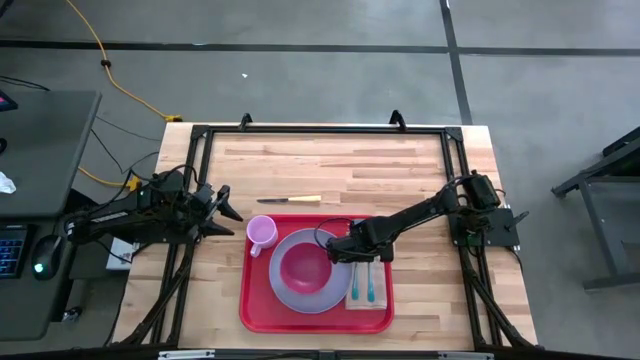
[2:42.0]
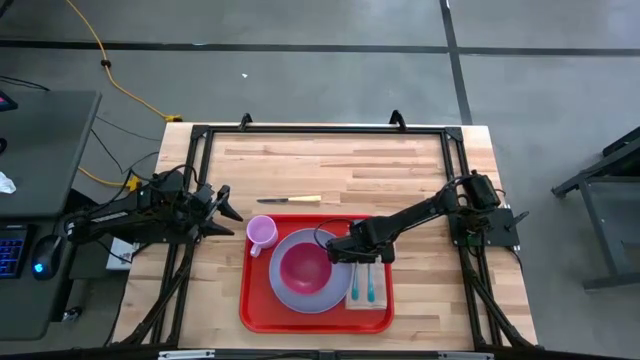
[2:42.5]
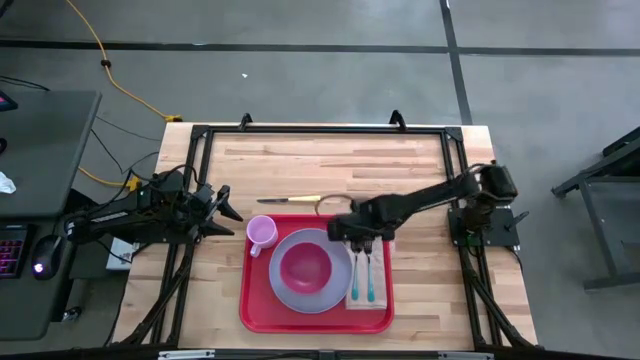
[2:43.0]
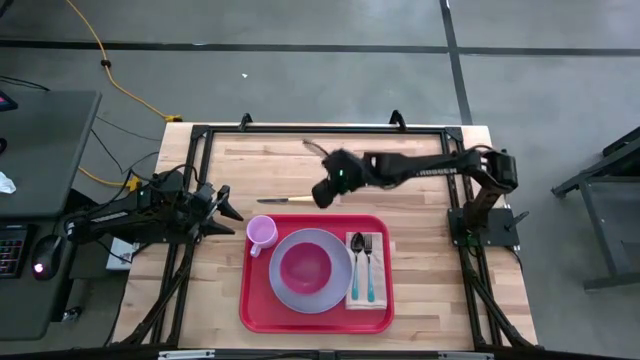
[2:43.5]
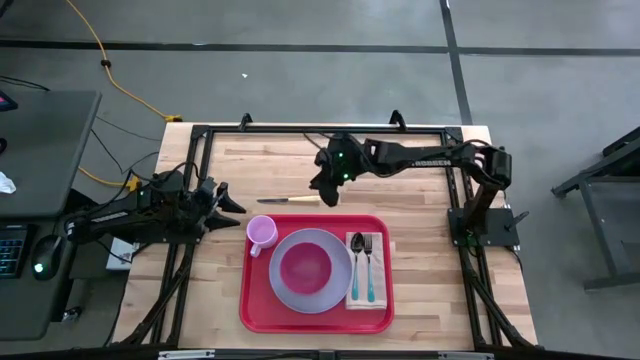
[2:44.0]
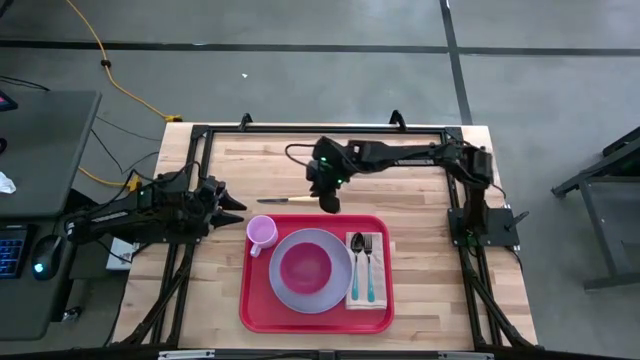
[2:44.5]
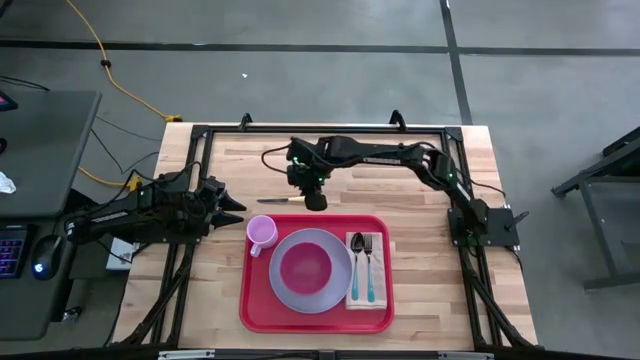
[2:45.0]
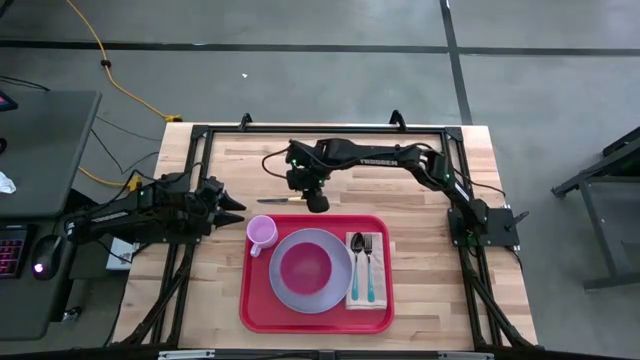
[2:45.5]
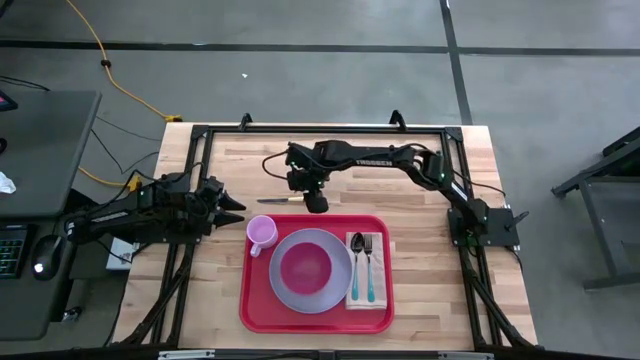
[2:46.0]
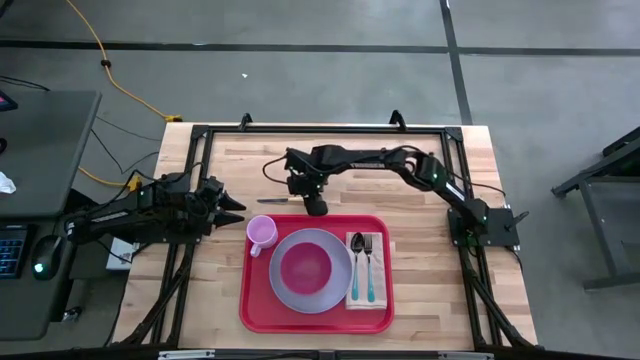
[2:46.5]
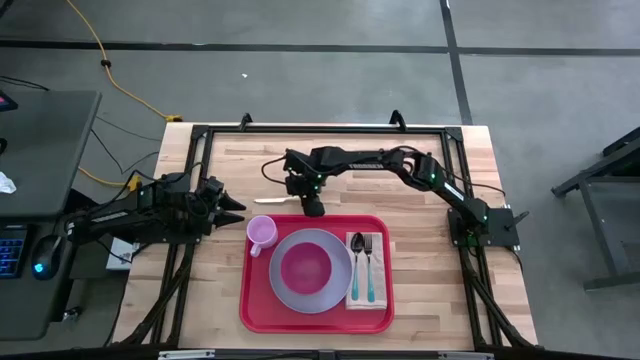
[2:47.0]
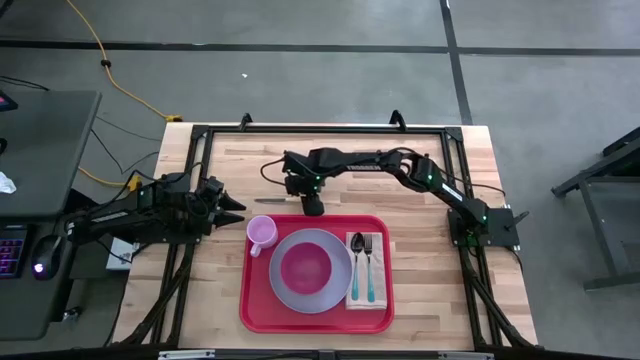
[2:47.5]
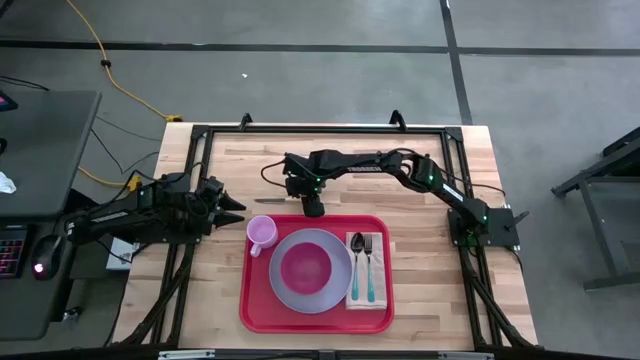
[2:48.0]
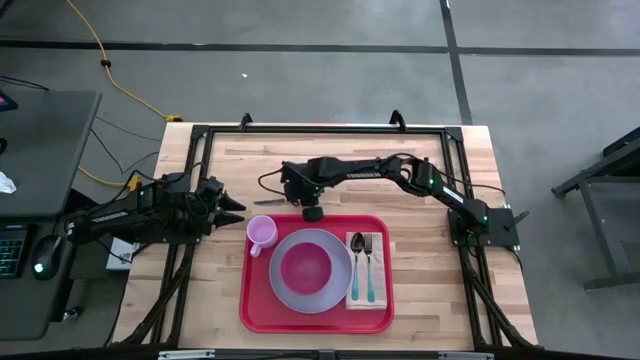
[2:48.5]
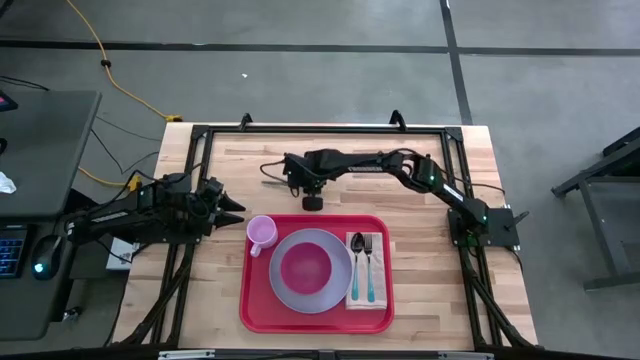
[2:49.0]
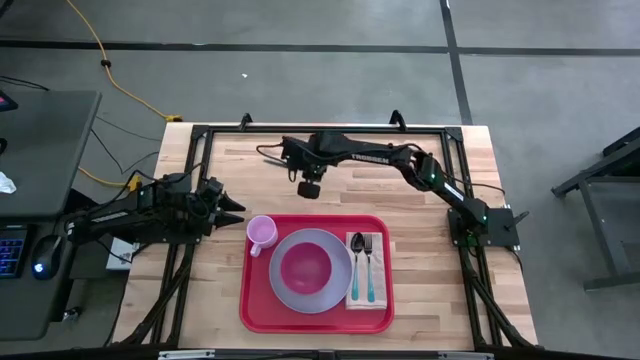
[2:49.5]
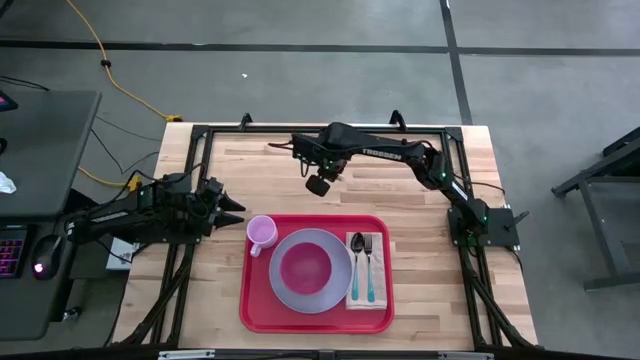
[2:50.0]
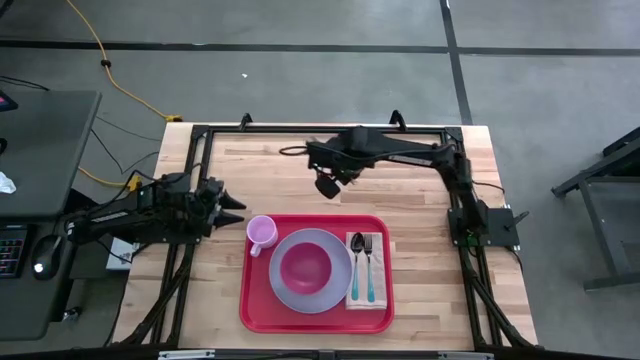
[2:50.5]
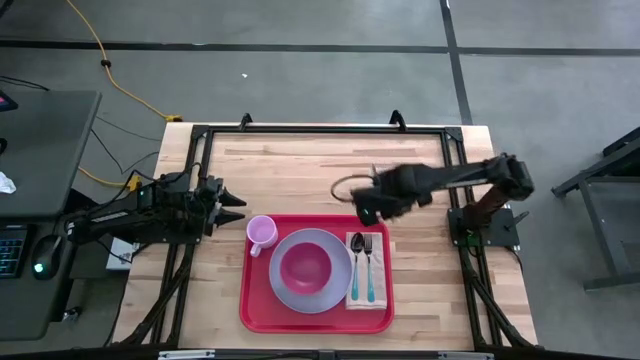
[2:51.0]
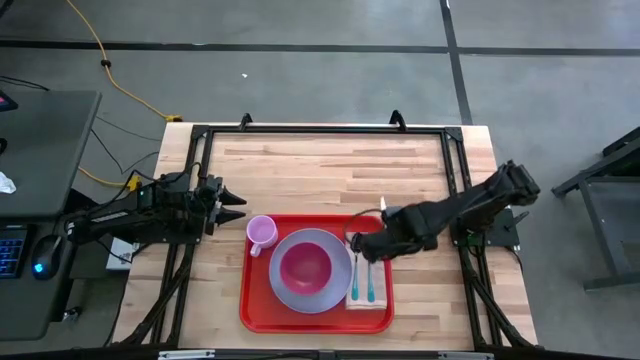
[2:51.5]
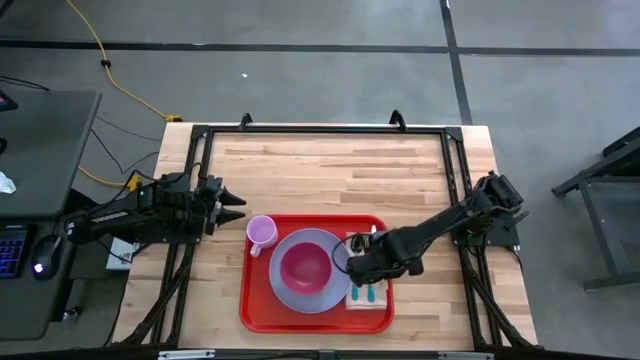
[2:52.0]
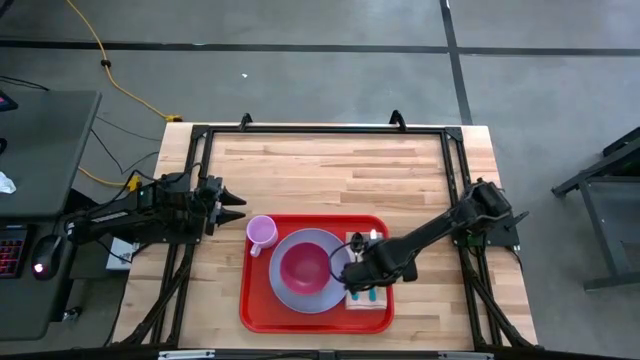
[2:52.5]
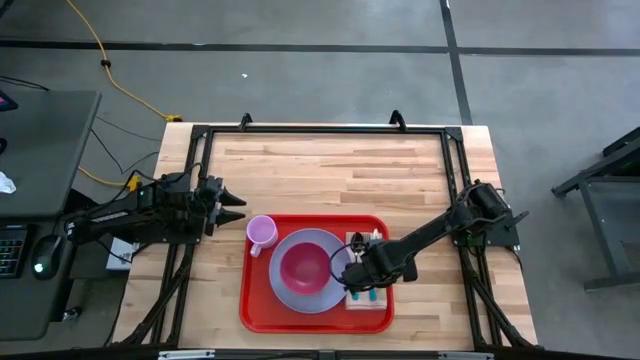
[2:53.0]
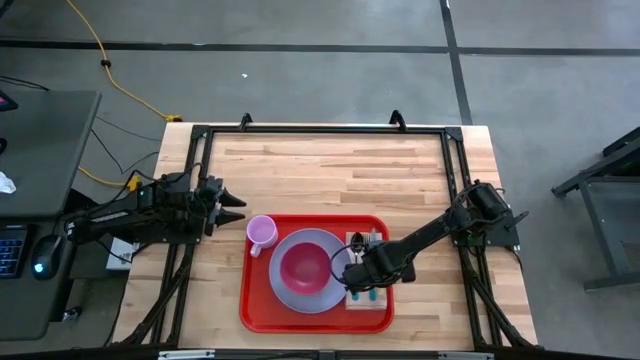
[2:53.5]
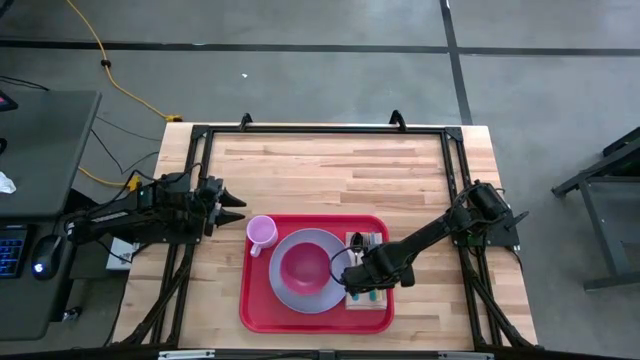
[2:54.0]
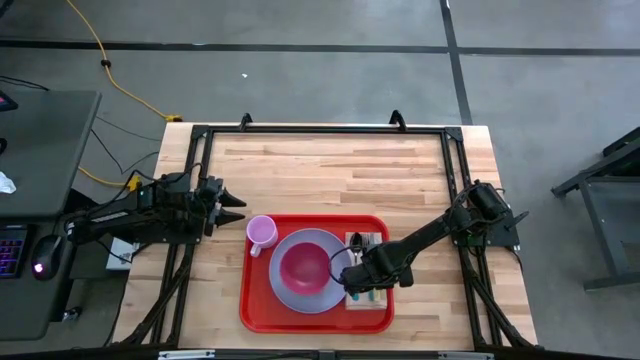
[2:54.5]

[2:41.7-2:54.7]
Task: Set up tray
Put the yellow knife on the brown napkin to the right of the blue fork

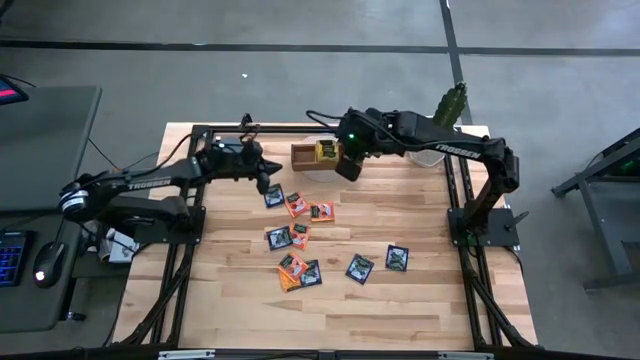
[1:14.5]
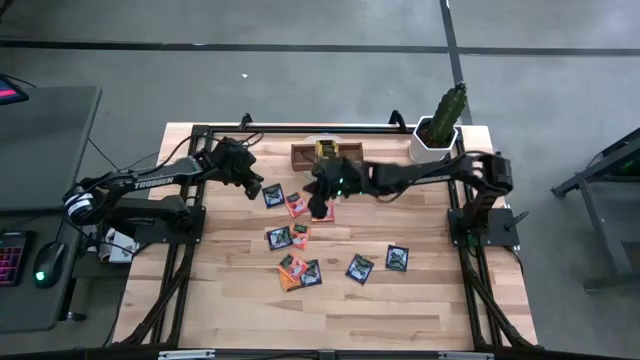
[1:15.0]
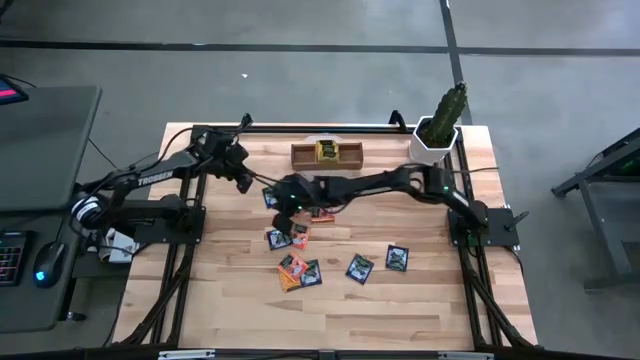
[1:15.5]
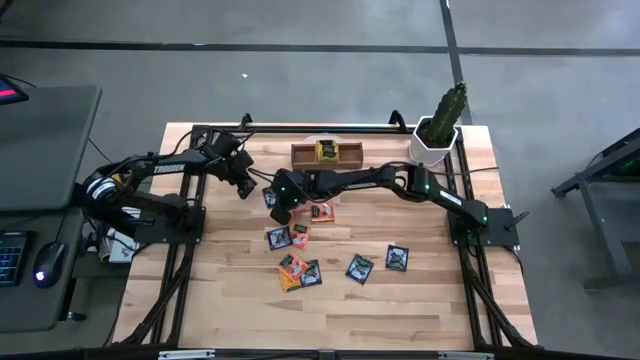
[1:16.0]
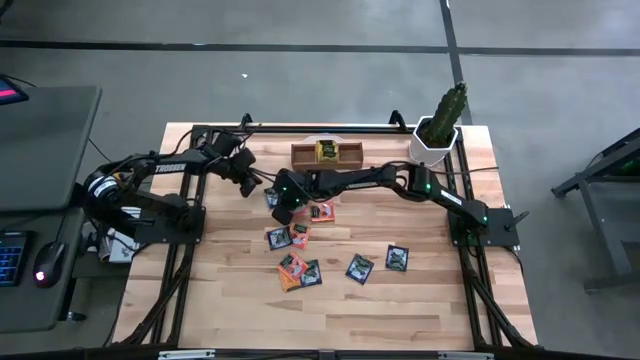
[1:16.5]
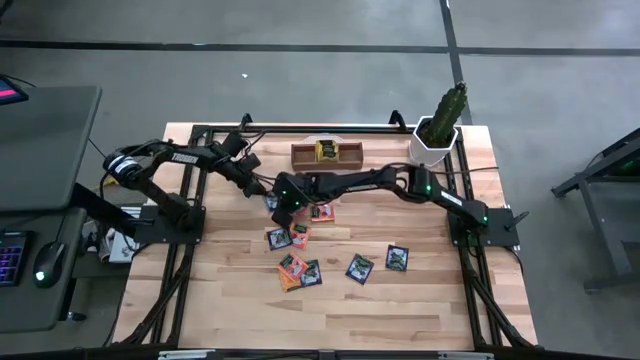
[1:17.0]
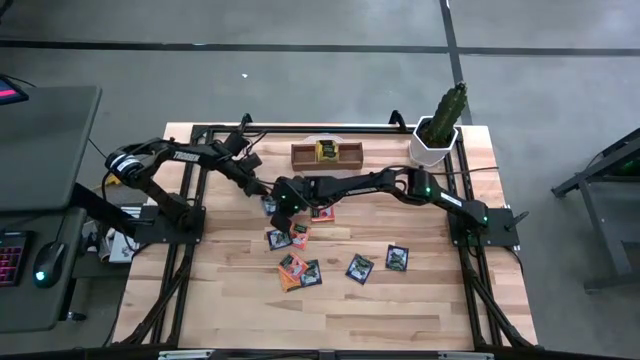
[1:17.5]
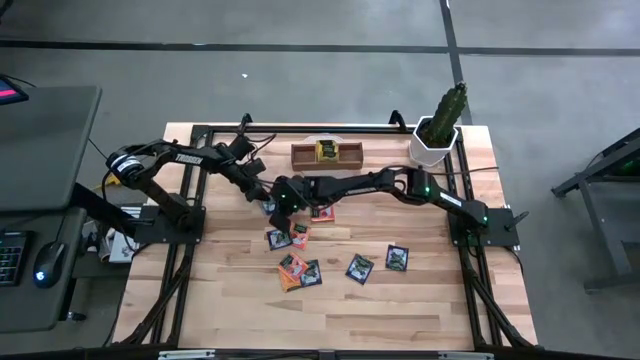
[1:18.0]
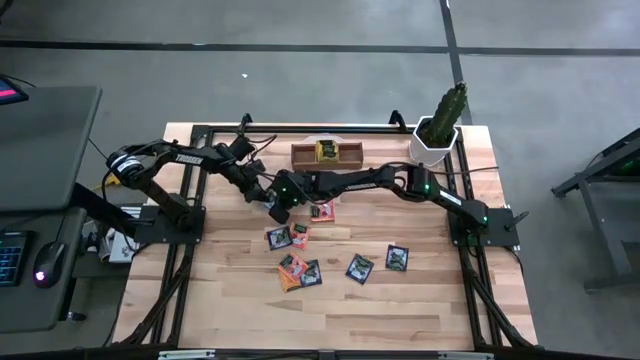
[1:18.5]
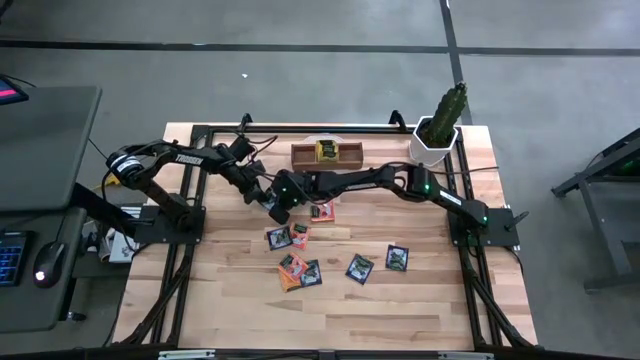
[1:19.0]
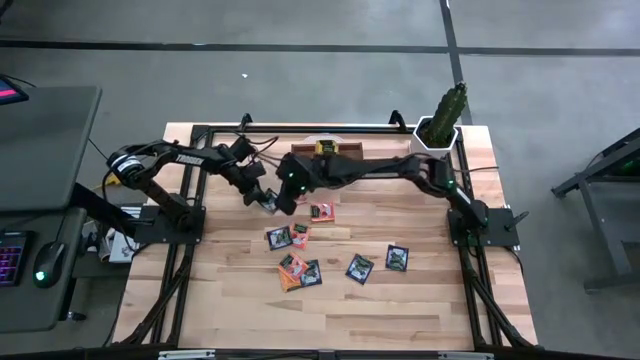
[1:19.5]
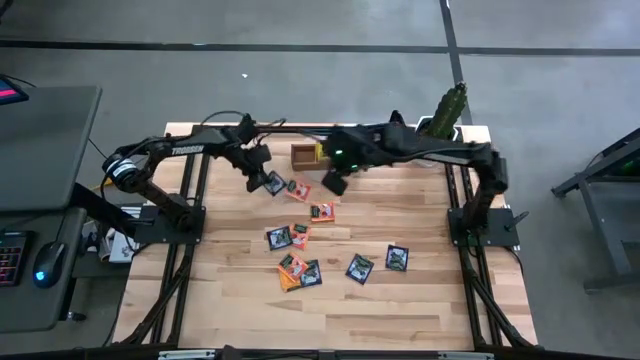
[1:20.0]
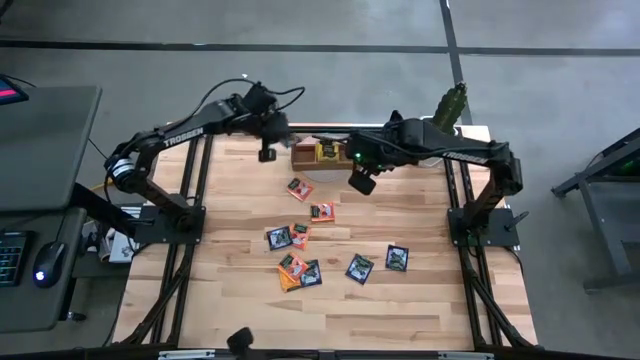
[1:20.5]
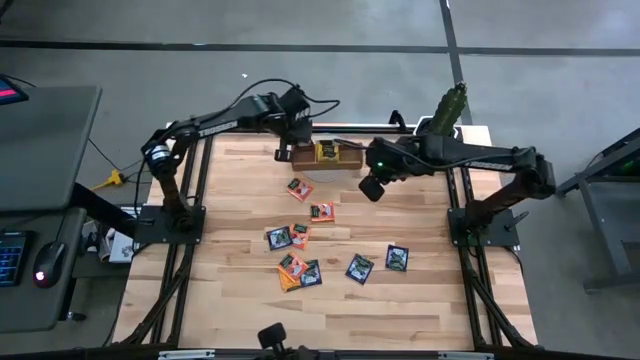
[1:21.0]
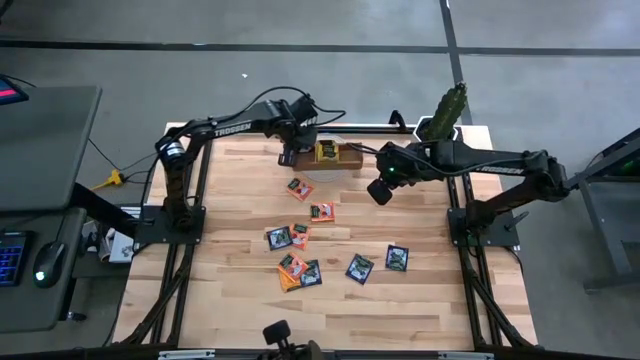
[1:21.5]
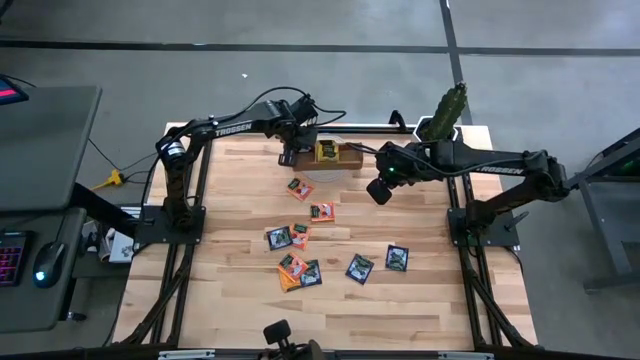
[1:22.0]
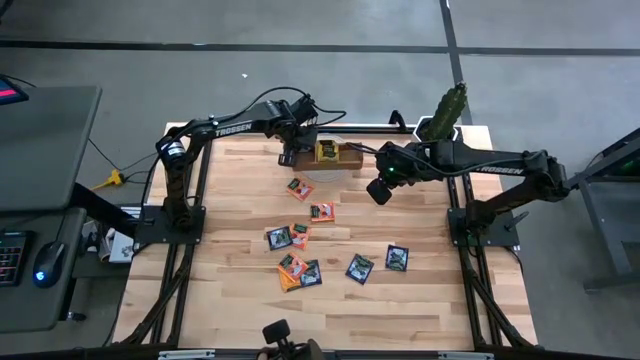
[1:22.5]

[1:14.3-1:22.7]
Task: Pick & Place Tea
Put the purple tea bag in the left compartment of the organizer
